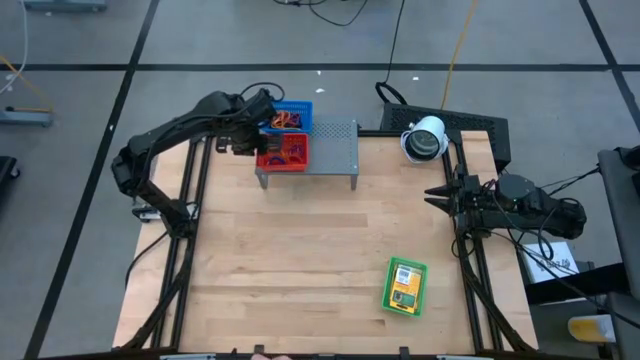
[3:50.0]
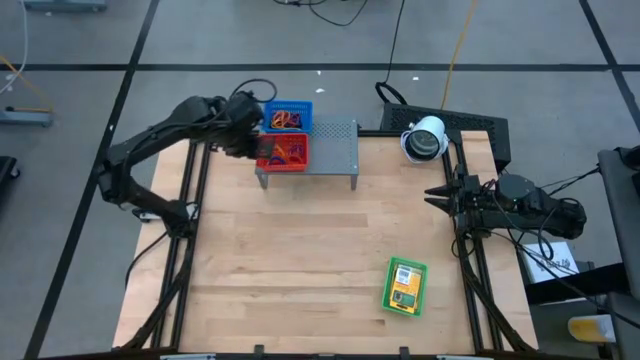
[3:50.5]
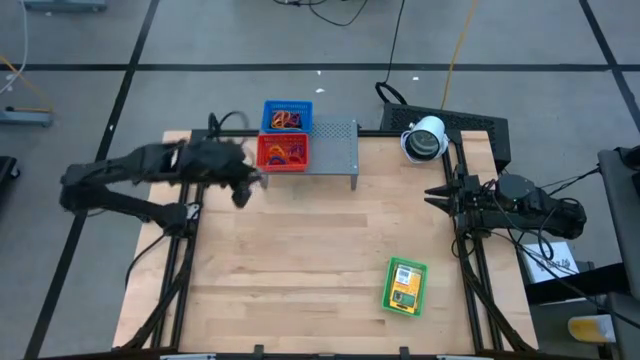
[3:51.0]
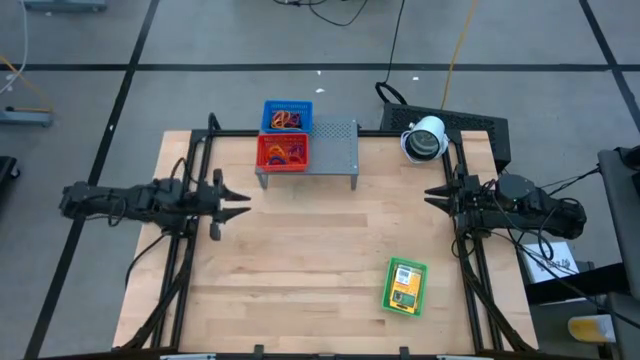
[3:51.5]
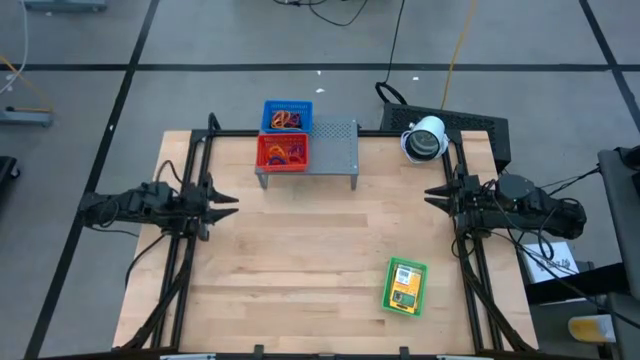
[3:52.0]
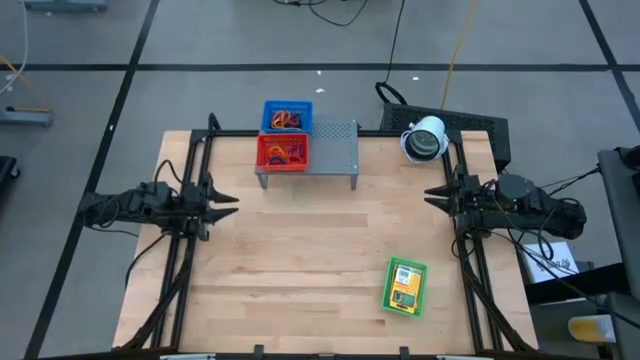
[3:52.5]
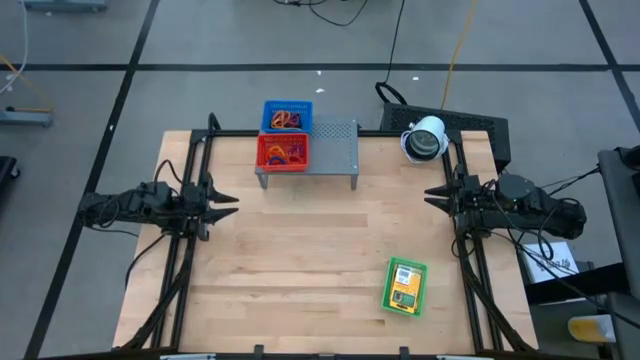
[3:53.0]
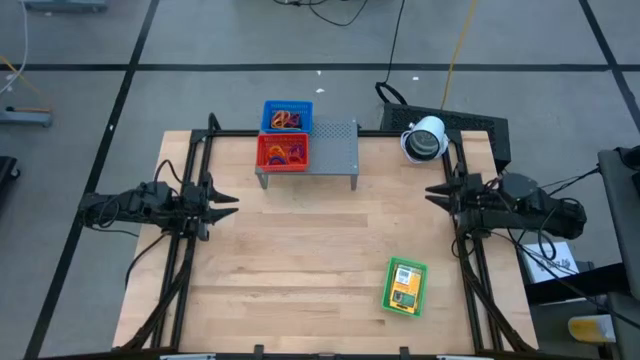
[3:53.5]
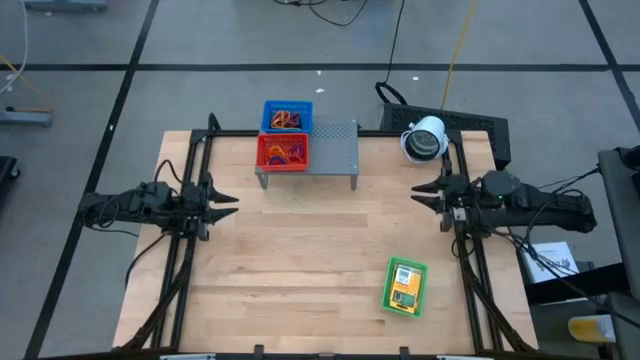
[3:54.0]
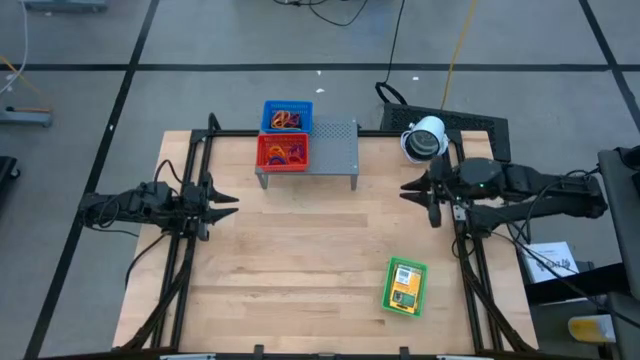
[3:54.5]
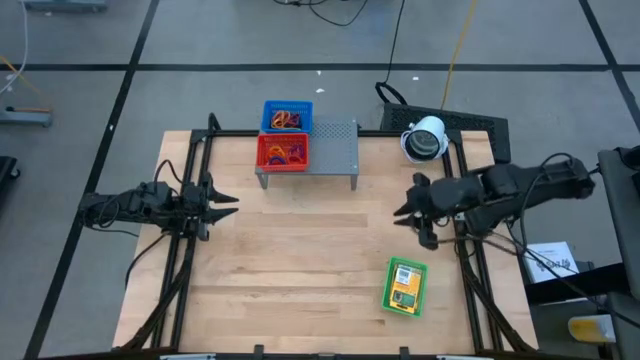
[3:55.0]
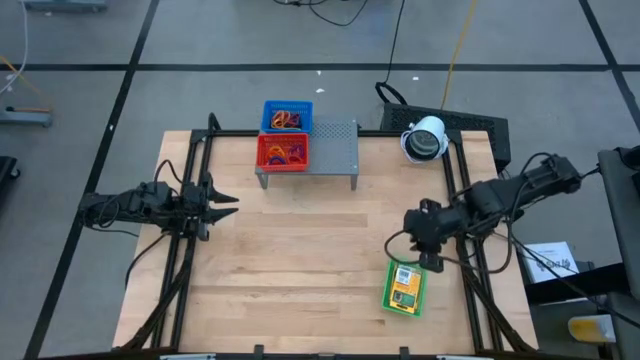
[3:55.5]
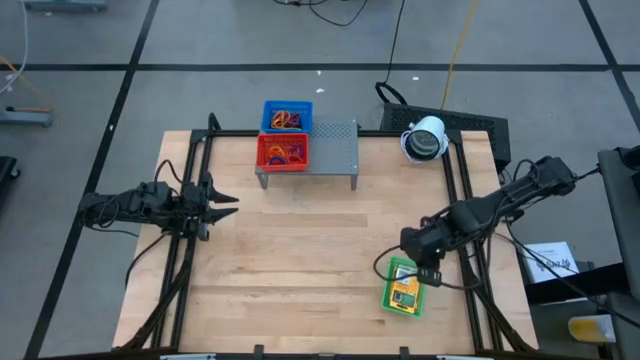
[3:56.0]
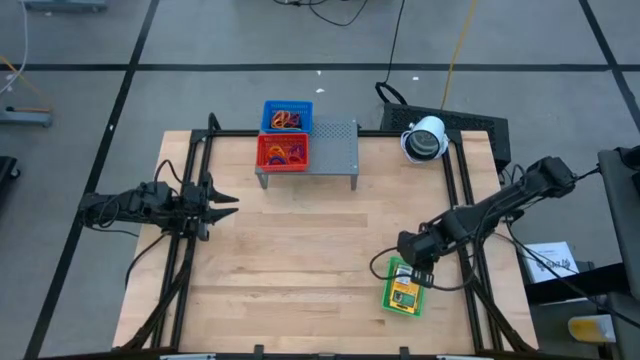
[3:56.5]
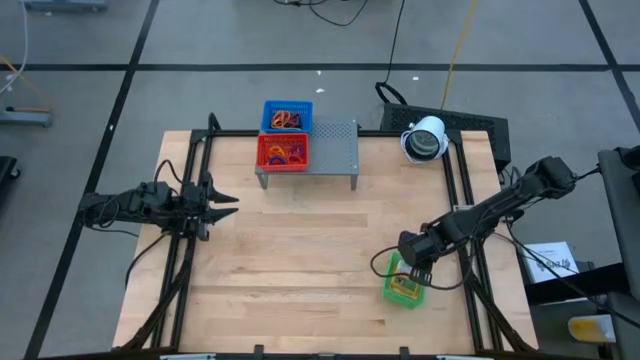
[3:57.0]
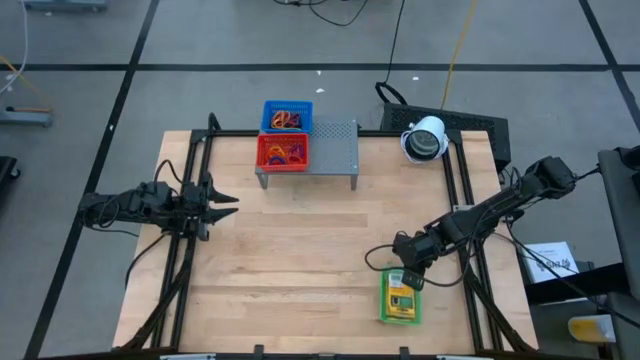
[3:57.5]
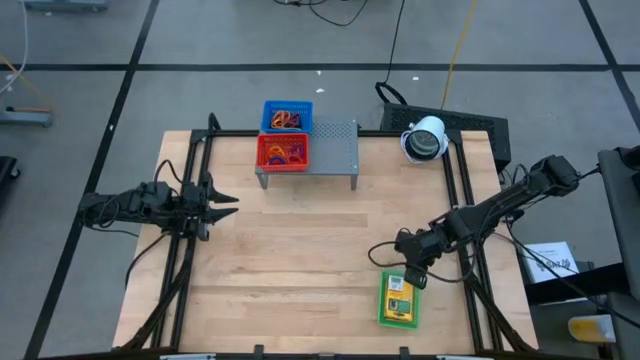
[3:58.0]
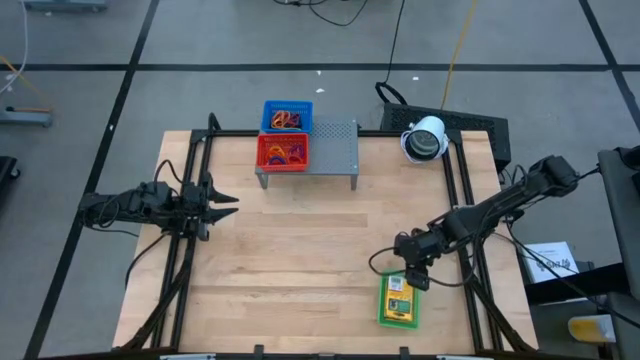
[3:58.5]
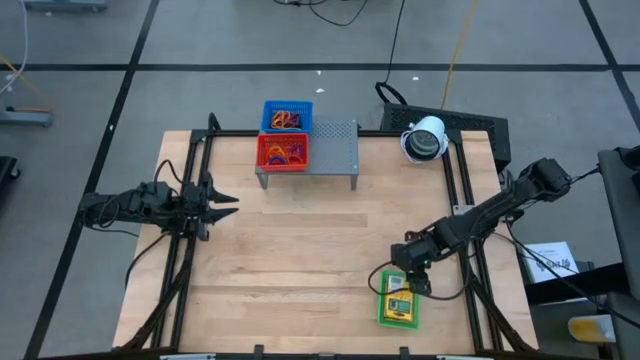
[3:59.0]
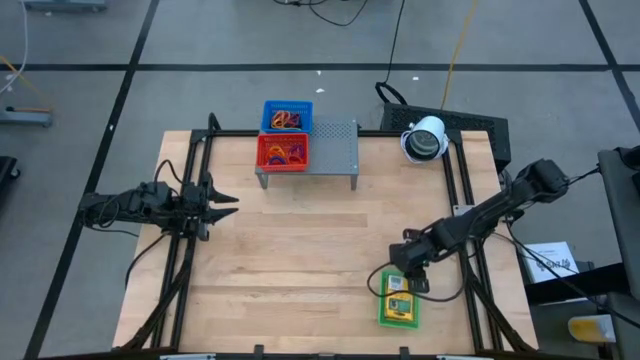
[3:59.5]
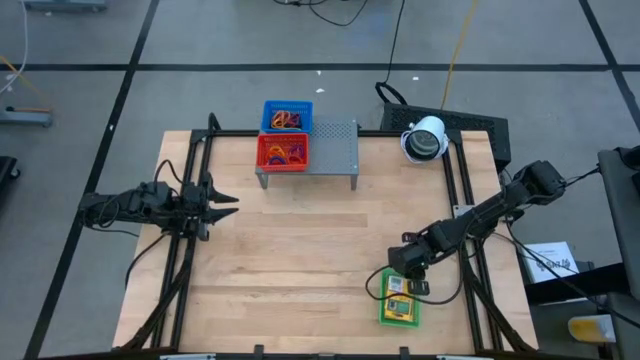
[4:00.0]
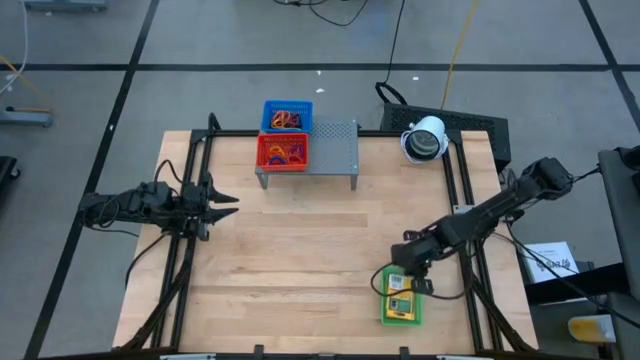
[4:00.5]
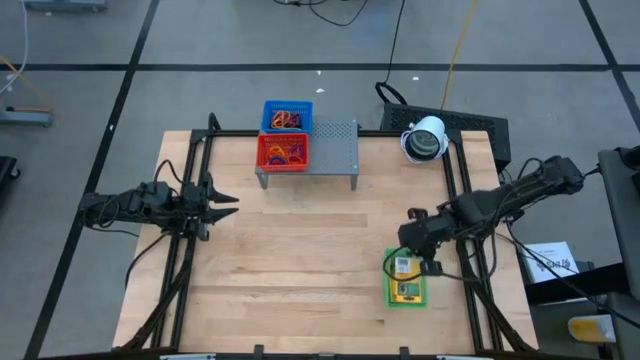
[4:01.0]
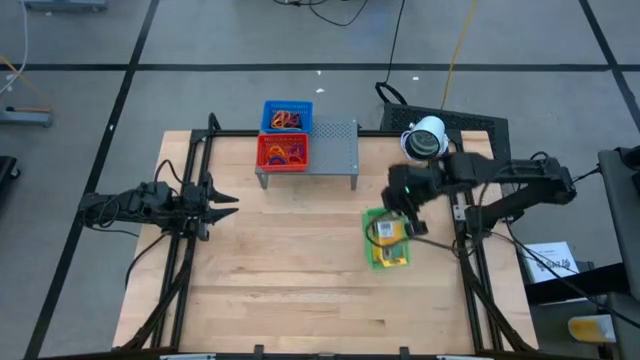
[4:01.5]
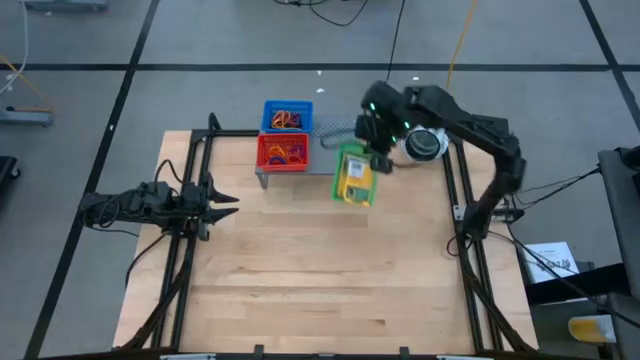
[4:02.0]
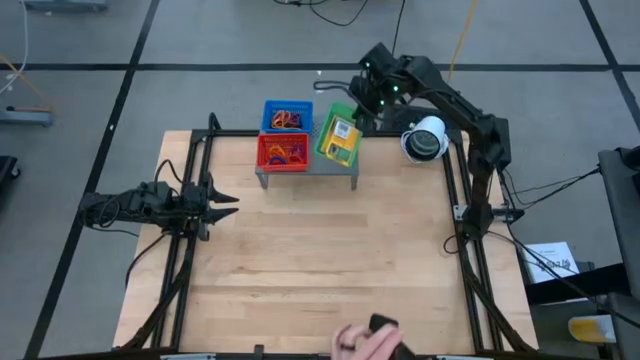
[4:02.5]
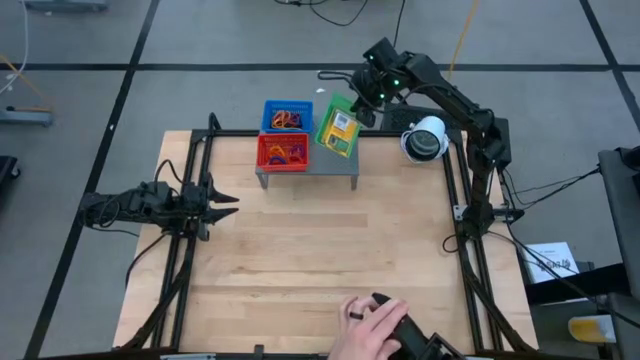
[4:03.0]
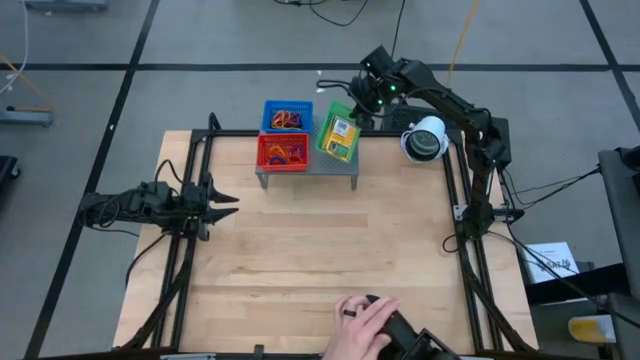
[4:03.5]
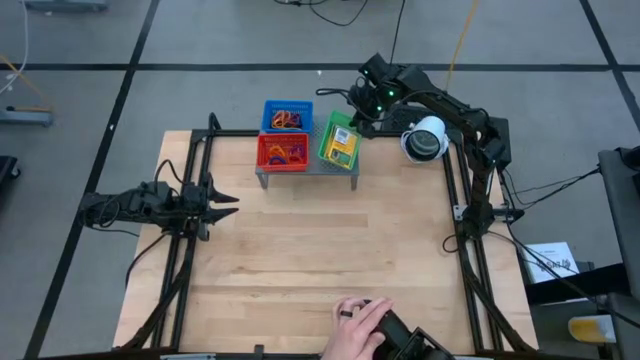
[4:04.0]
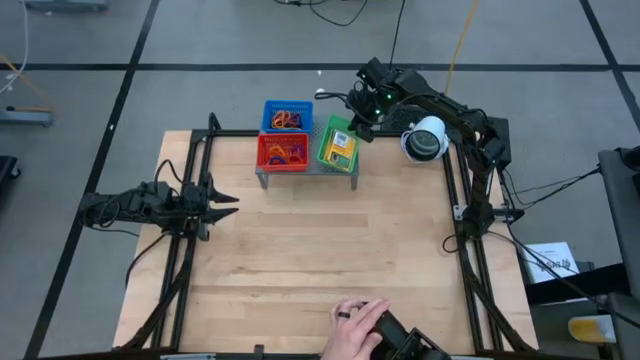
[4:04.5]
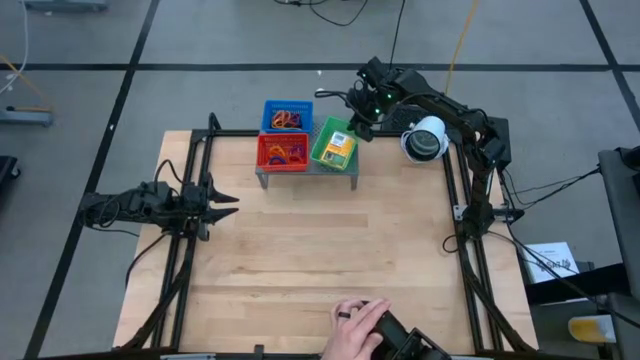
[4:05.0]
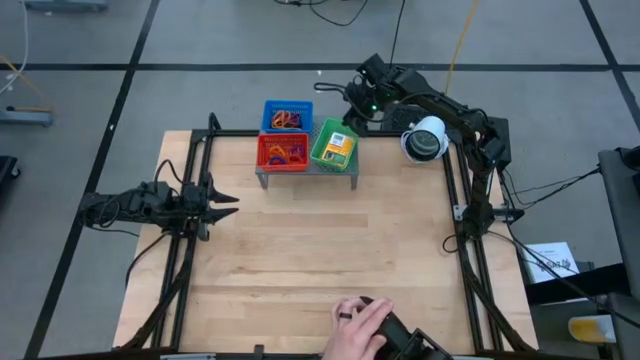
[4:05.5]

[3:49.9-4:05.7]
Task: Pick & Place Office Desk Supplies
Put the green bin on the shelf

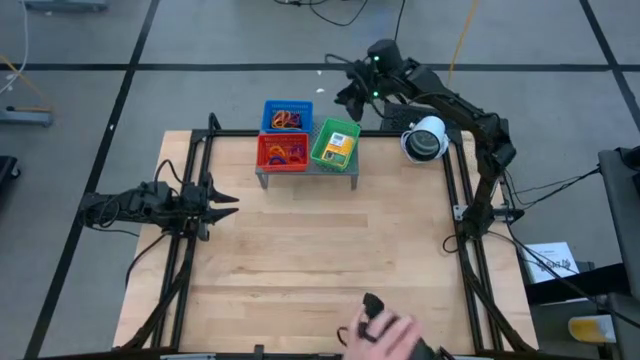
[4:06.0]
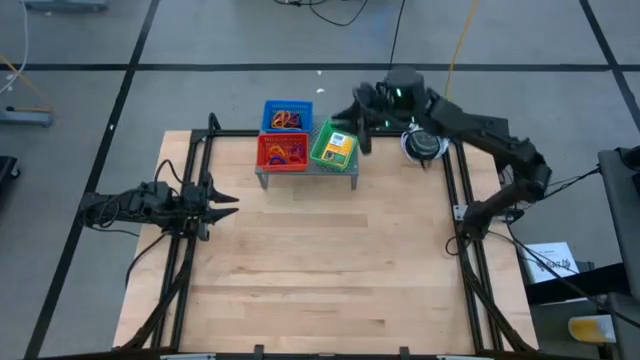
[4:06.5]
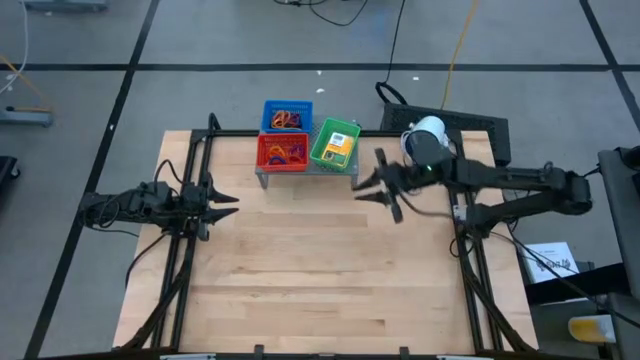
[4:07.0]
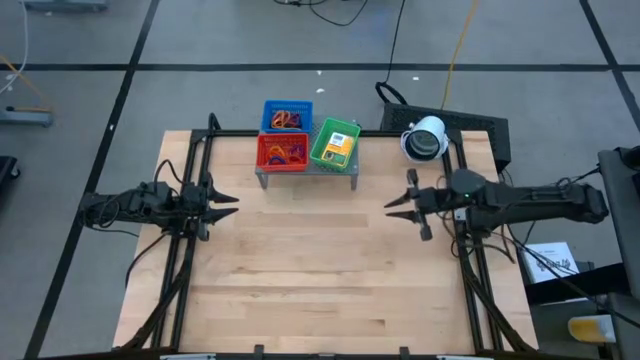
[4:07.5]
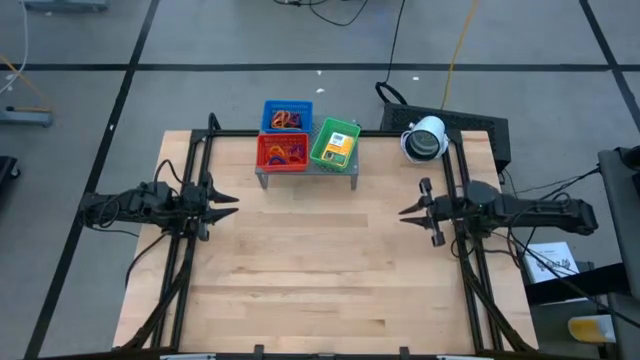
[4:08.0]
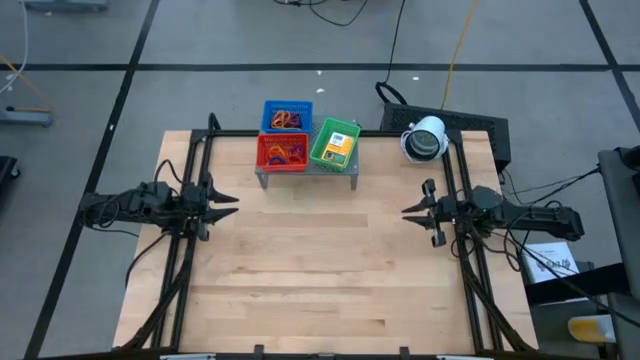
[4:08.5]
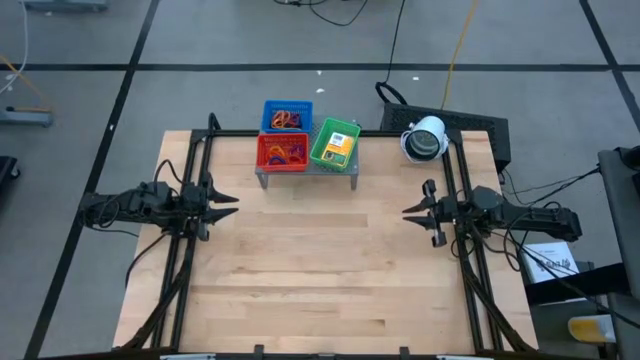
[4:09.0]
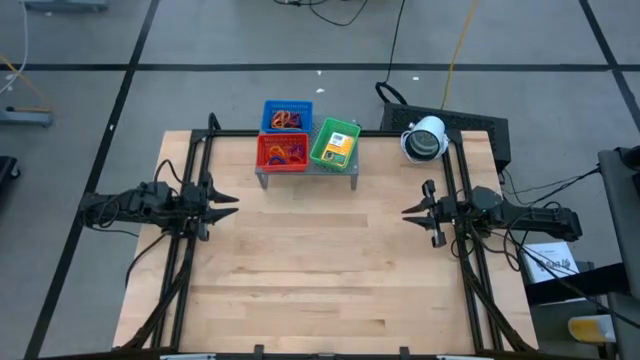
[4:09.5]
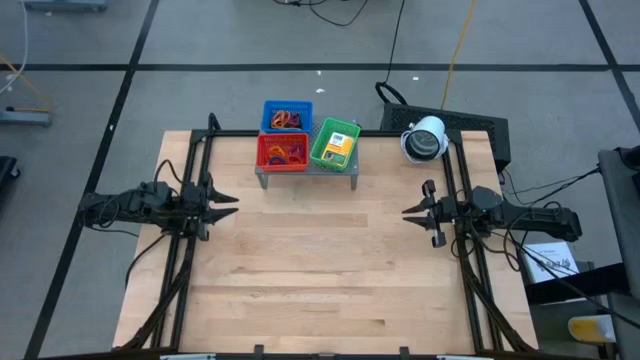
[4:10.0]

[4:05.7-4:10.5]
Return to Home Position

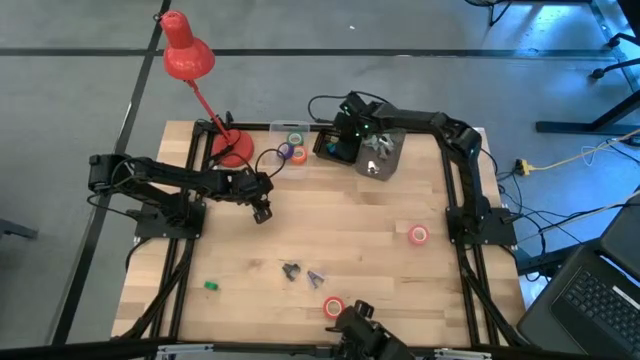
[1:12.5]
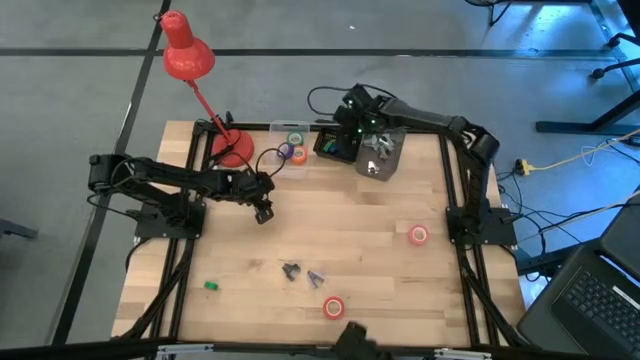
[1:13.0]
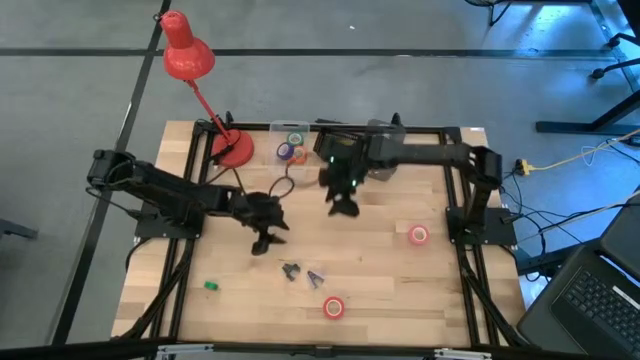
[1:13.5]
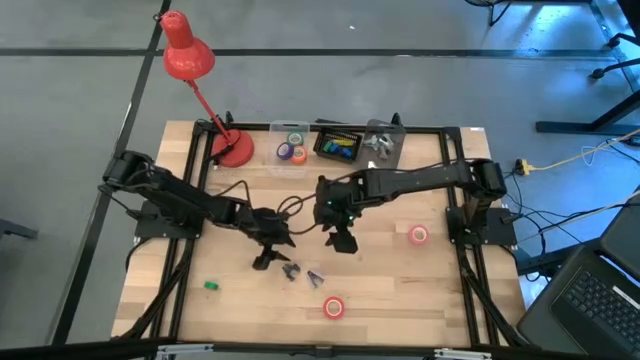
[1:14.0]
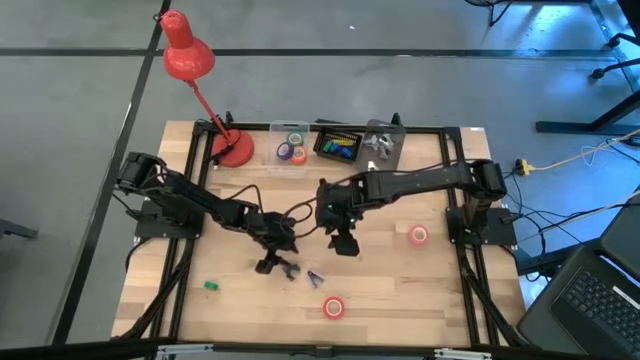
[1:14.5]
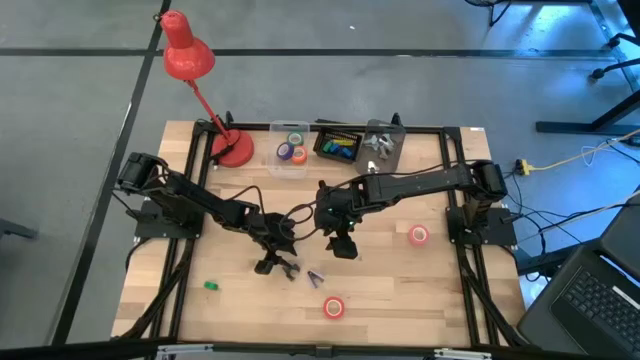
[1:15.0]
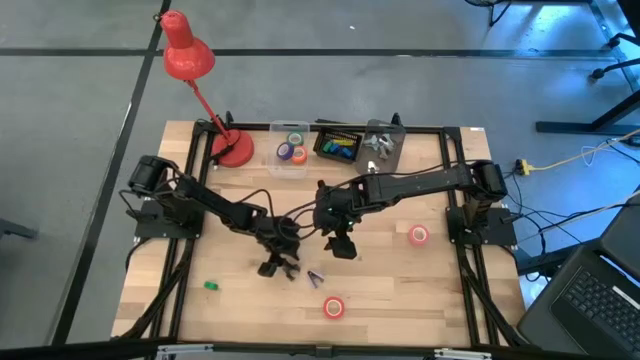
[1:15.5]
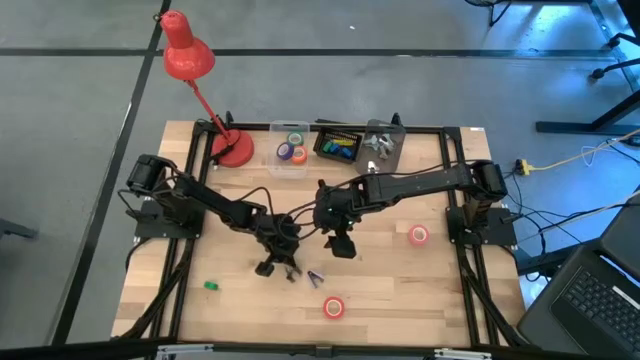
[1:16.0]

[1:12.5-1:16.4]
Task: Pick and place Stapler, Stapler remover, tape
Put the black staple remover into the right black bin
